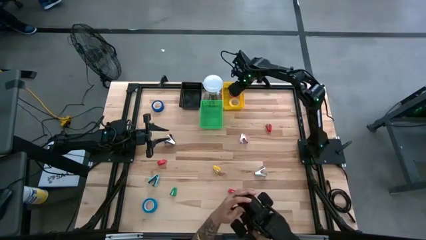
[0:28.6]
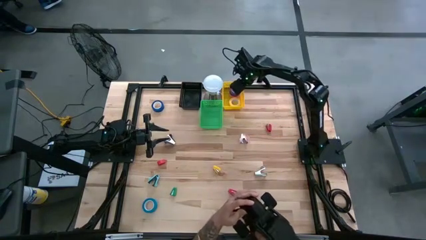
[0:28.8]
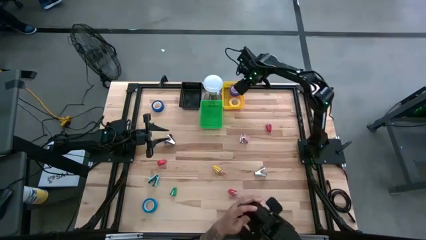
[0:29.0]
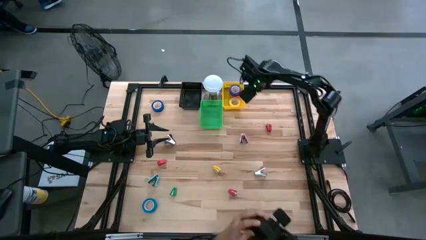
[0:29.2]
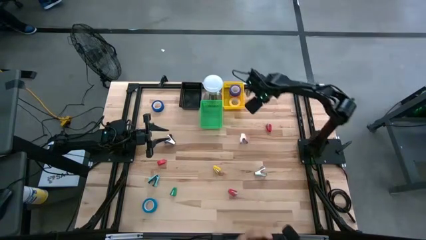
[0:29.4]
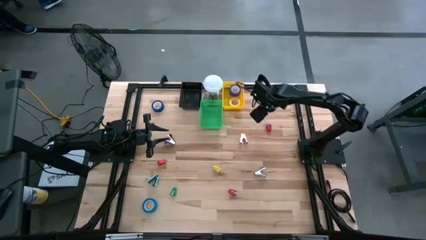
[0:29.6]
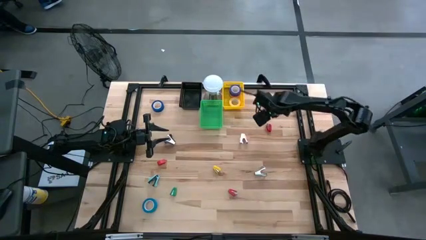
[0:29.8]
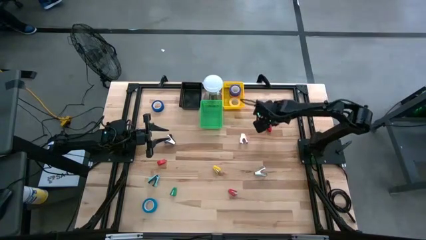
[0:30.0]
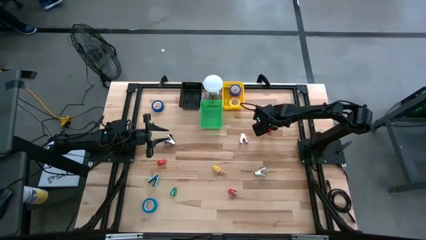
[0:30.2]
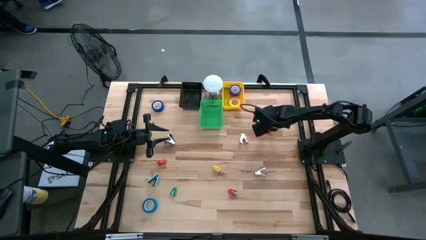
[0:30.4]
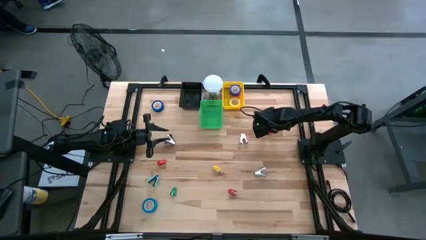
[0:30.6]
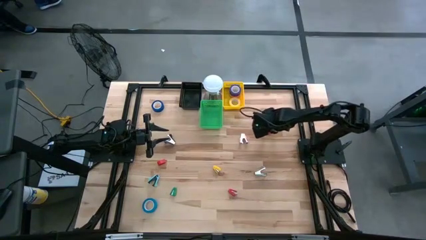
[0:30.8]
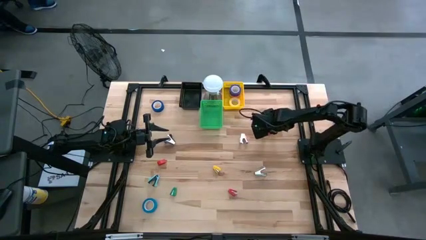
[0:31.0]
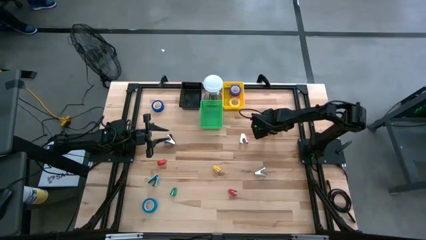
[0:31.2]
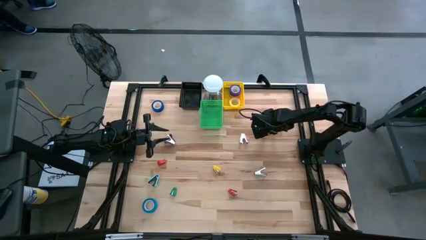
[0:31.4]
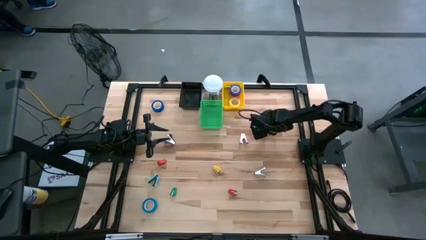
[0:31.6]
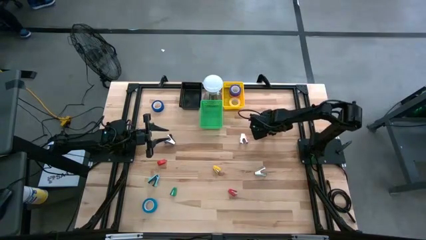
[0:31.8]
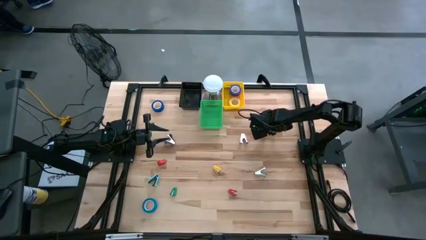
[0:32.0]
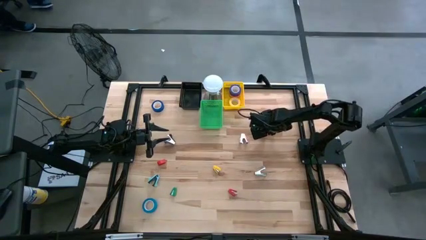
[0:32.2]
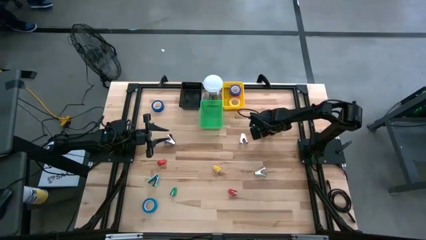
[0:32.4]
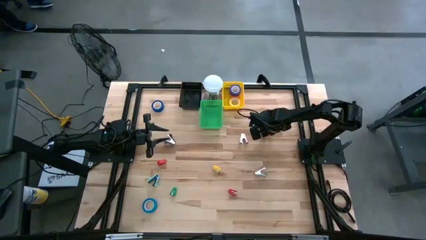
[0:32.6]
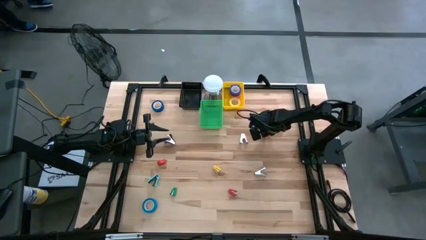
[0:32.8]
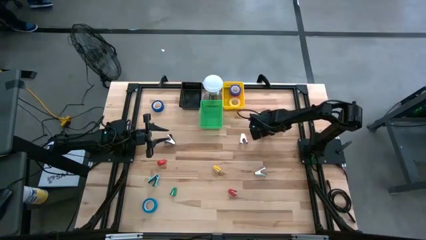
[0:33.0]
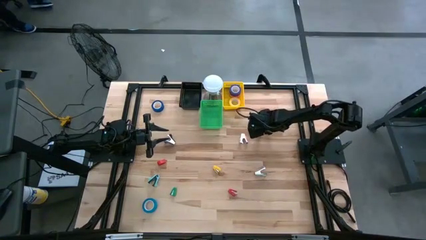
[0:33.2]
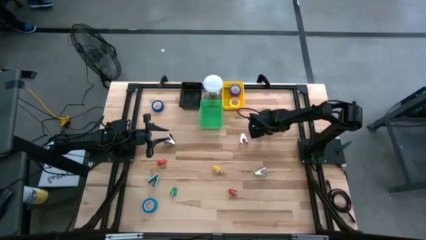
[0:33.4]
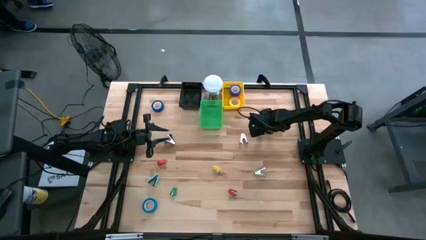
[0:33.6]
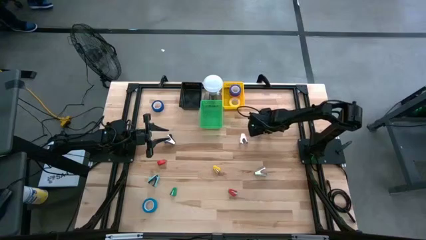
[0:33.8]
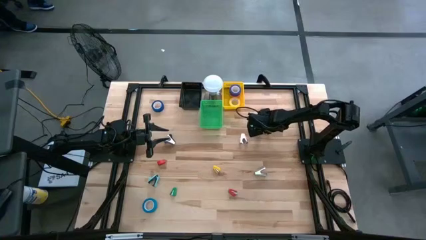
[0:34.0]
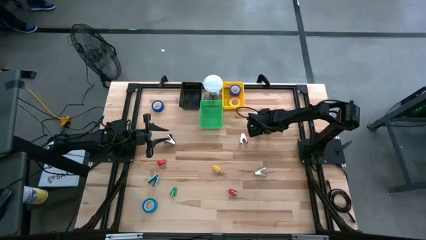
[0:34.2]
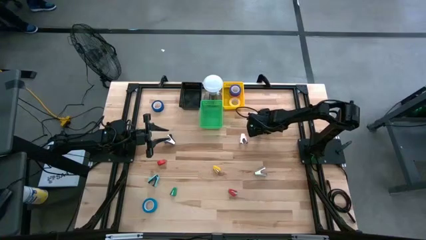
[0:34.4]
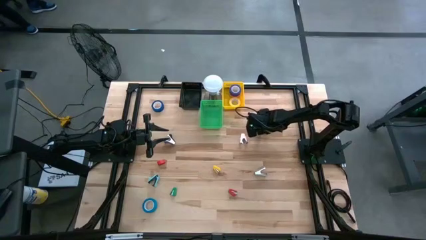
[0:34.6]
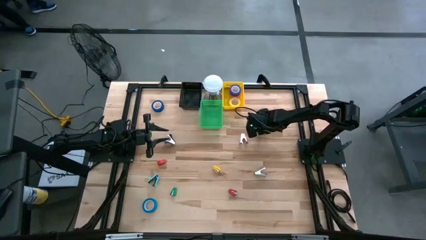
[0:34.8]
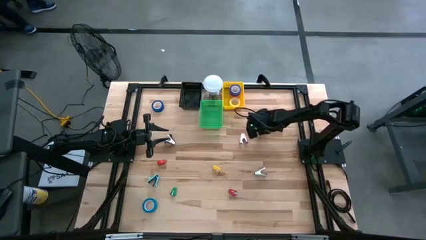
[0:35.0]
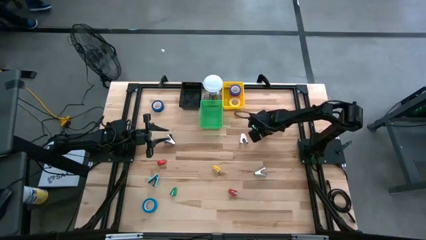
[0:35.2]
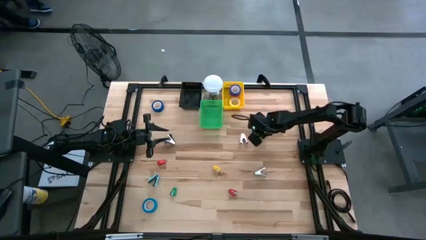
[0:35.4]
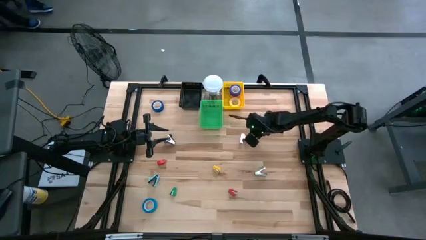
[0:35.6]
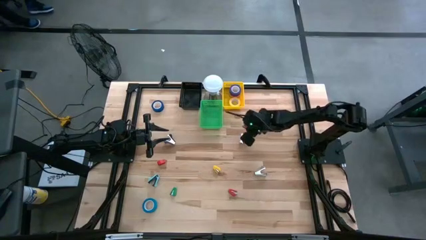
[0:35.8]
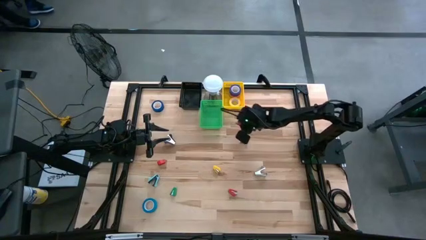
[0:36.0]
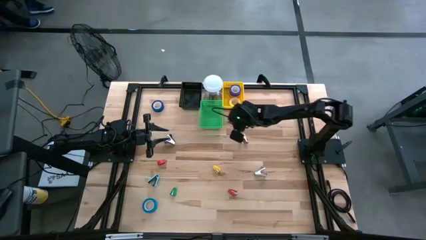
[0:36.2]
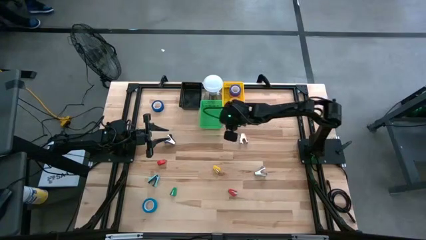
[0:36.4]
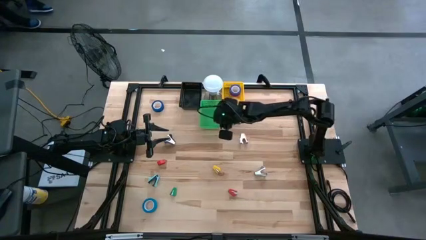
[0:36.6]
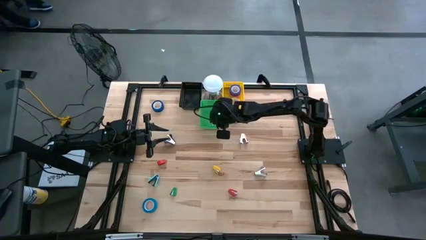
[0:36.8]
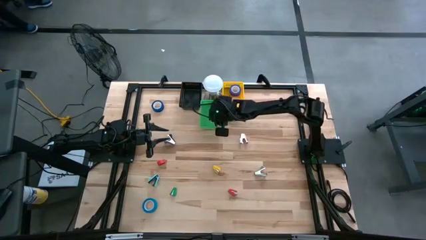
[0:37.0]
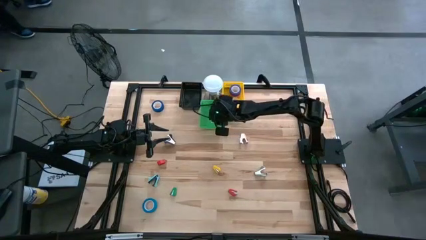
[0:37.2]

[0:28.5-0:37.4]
Task: Pick and place Stapler, Stapler remover, tape
Put the top red stapler into the green bin

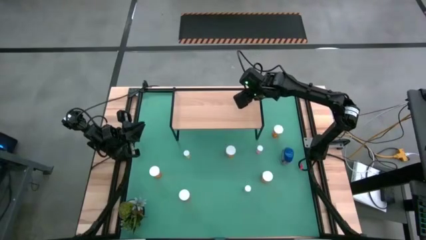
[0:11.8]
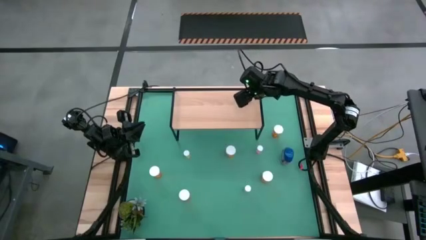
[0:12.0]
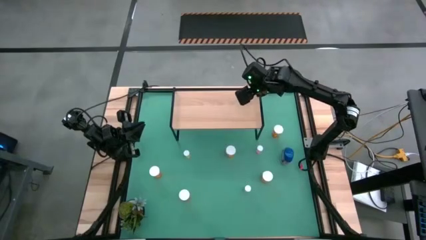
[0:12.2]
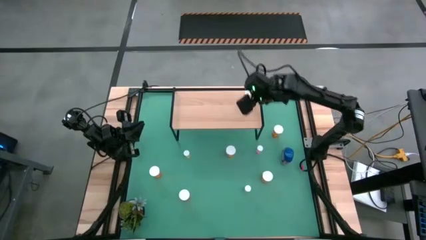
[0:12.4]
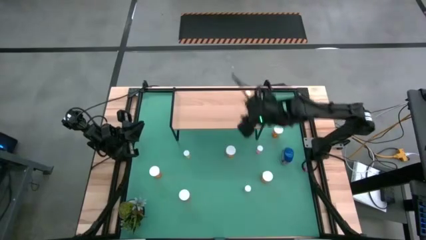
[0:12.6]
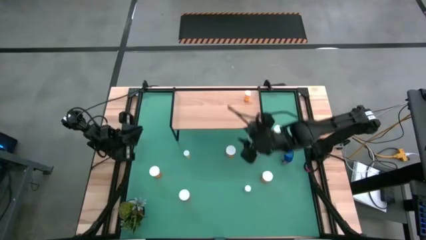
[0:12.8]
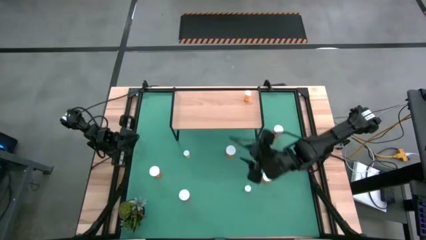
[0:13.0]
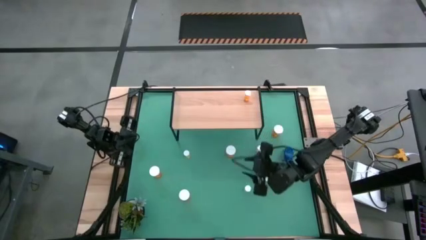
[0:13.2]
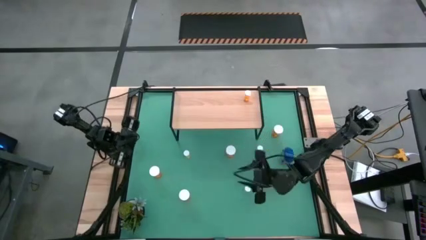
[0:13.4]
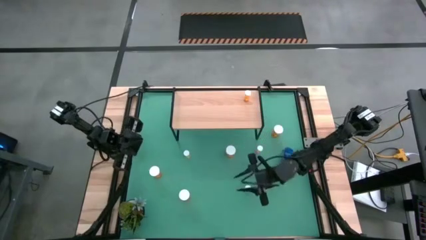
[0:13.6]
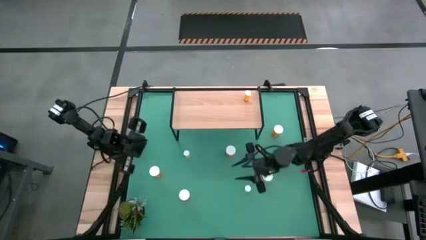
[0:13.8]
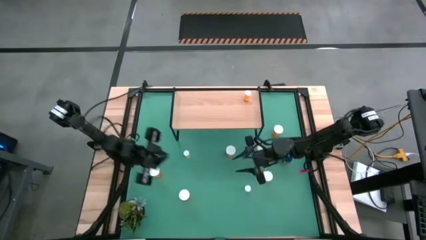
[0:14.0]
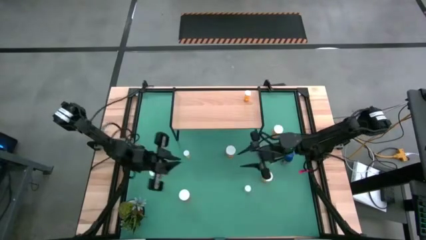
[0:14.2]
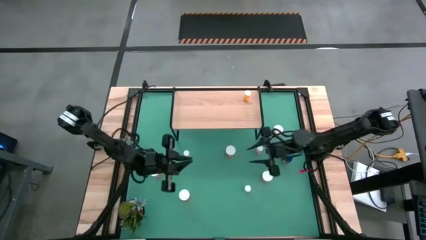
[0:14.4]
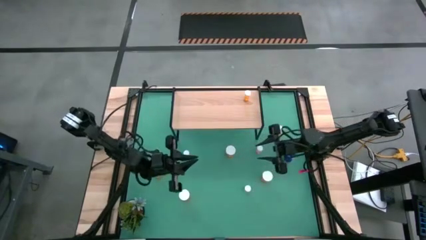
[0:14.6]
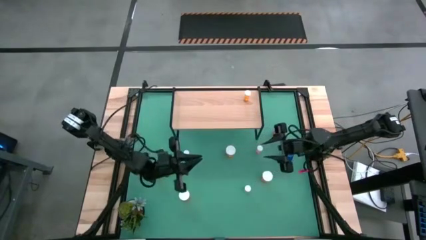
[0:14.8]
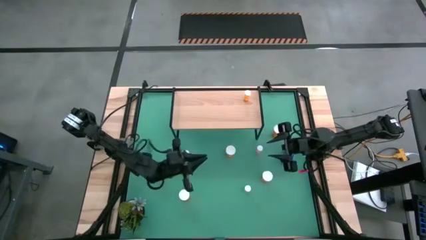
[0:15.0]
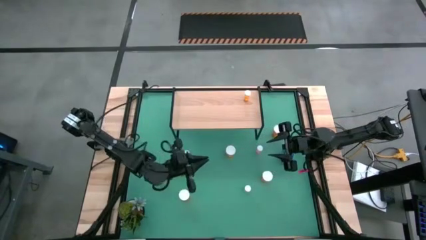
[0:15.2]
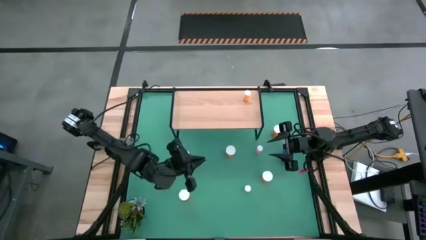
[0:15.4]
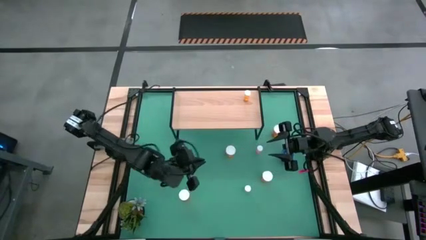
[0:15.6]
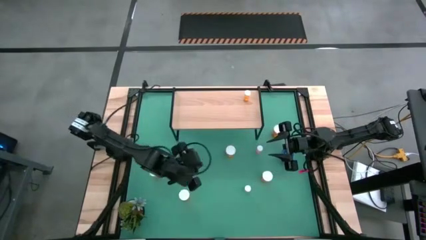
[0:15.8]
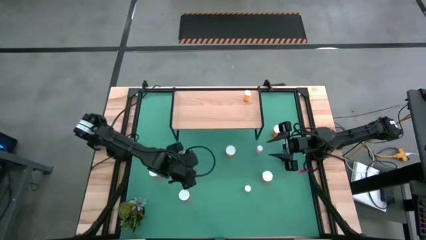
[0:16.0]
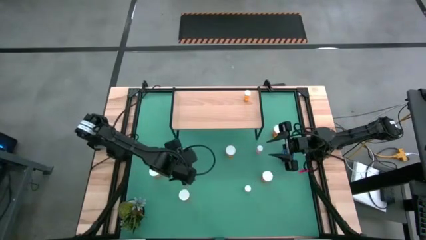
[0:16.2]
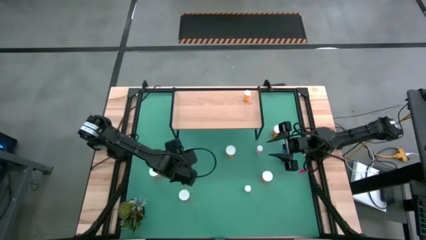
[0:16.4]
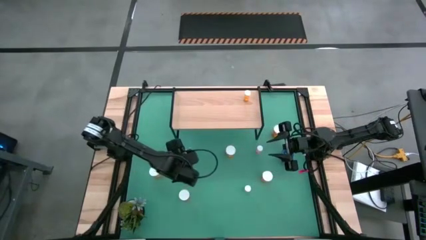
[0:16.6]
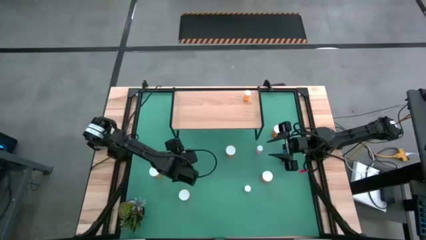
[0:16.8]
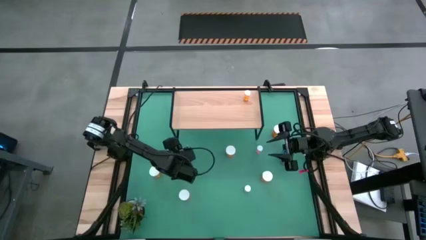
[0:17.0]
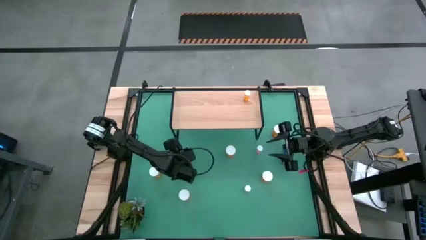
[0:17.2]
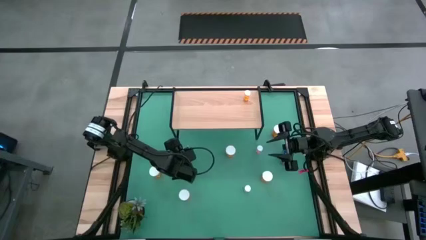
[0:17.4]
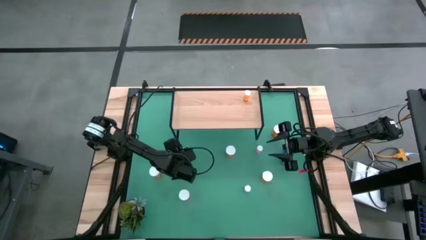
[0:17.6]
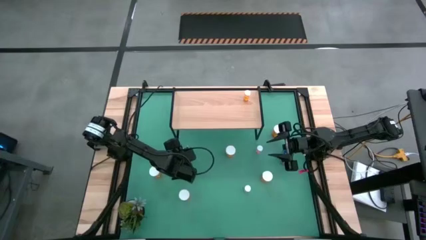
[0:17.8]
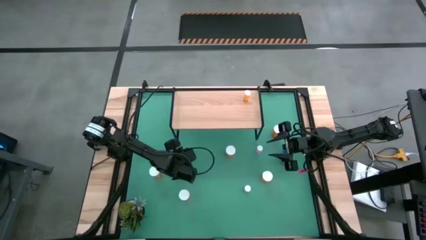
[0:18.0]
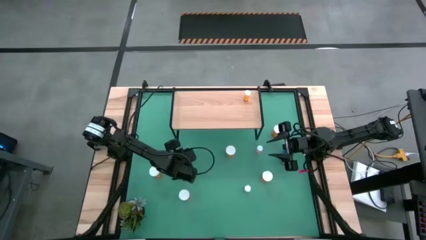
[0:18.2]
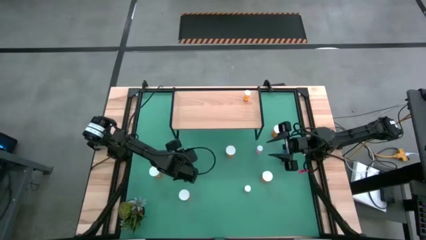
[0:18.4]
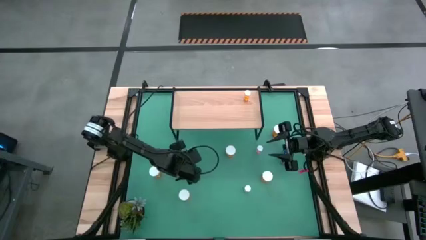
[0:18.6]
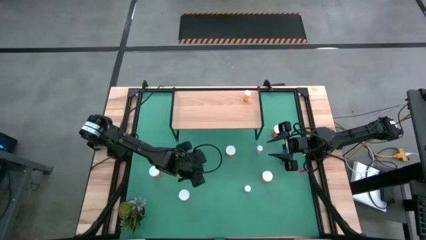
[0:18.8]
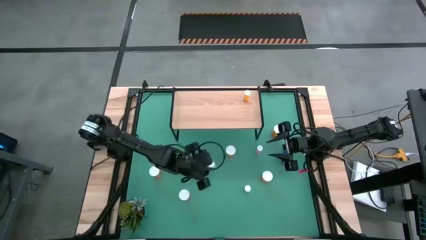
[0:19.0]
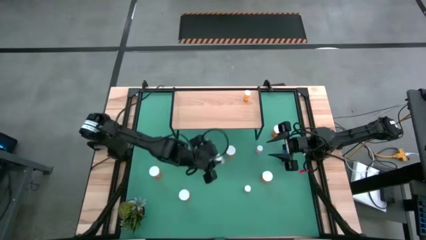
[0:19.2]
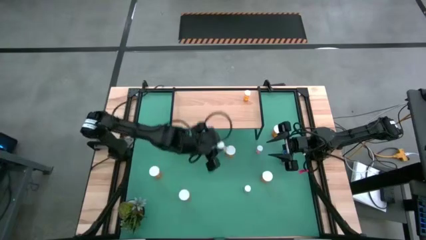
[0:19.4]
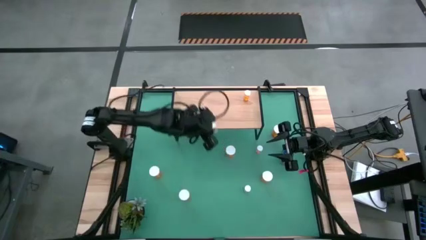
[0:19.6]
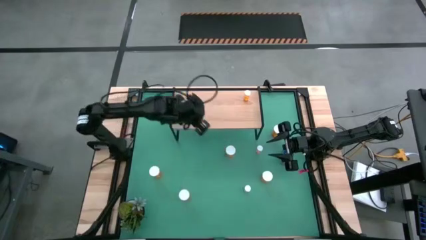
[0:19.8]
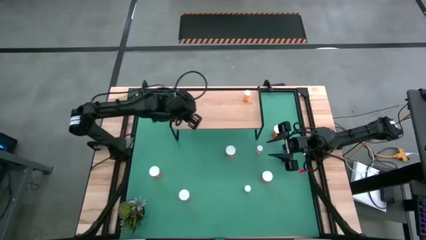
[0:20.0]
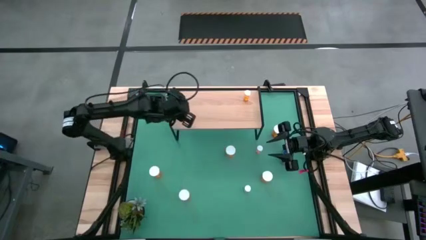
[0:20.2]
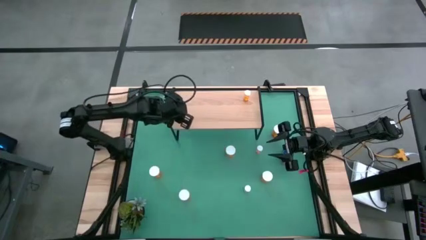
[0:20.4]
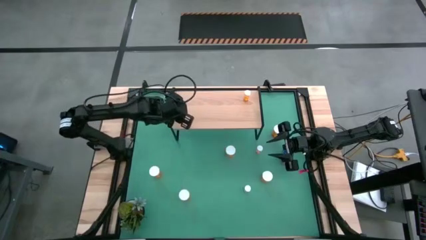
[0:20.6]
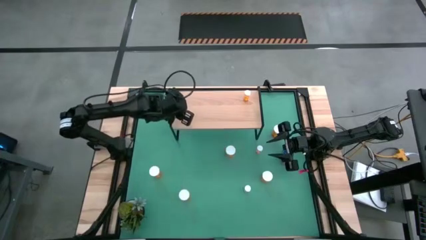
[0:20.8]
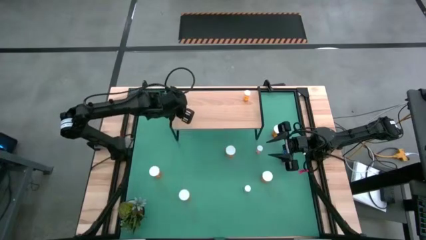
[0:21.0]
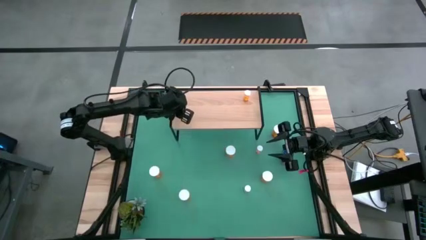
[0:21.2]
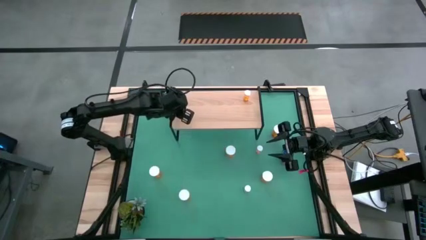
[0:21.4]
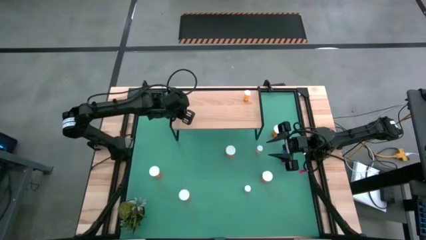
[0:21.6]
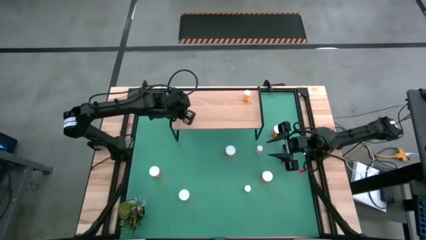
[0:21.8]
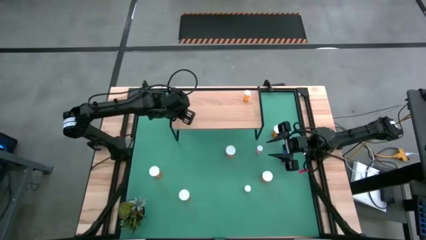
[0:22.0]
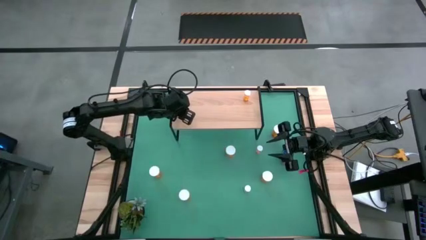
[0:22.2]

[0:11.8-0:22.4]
Task: Pick and place medicine bottles onto shelf by color
Put the small green top pill bottle on the shelf
